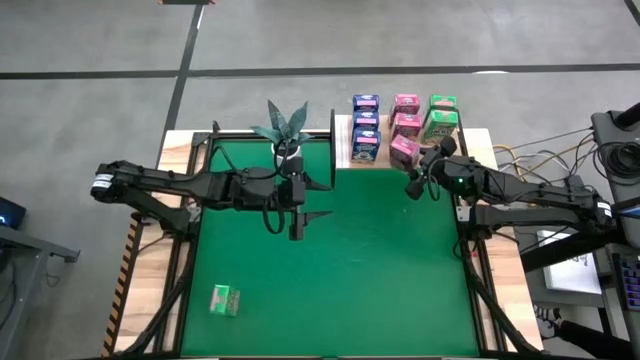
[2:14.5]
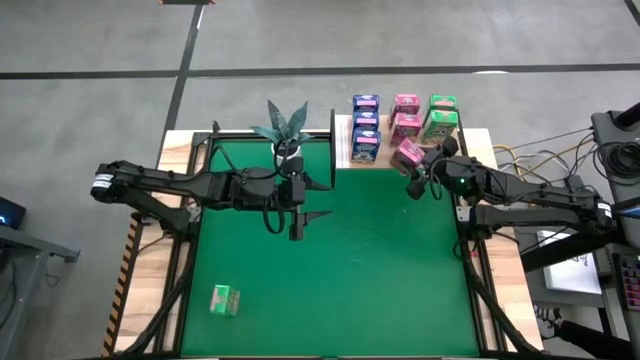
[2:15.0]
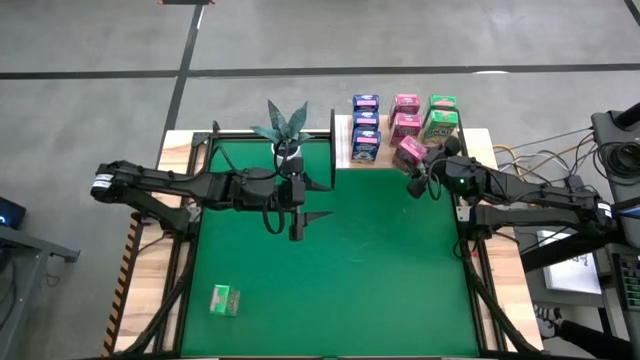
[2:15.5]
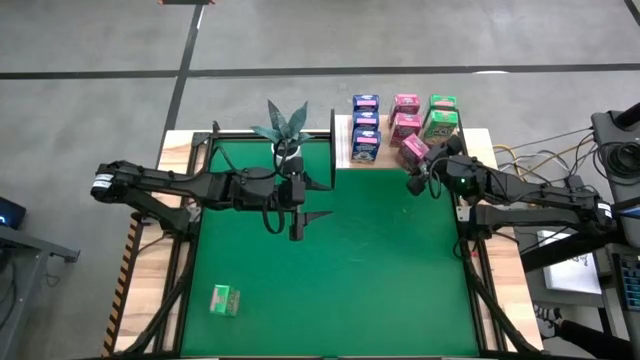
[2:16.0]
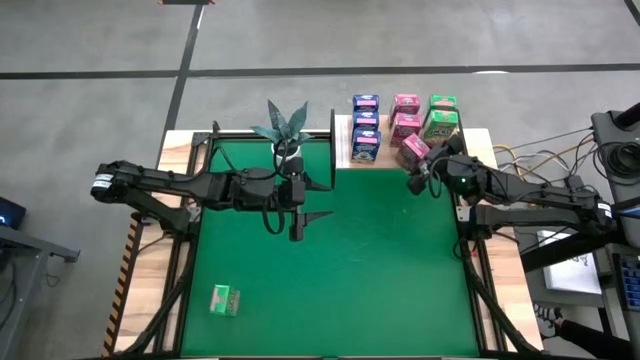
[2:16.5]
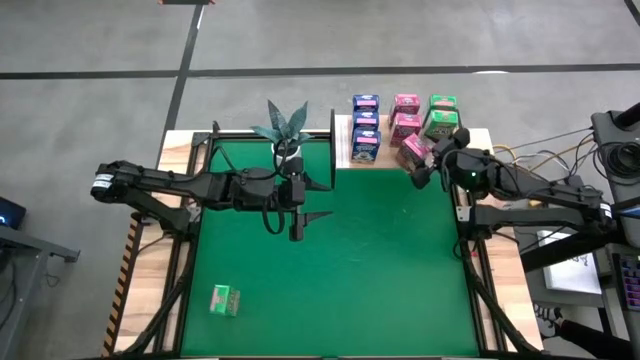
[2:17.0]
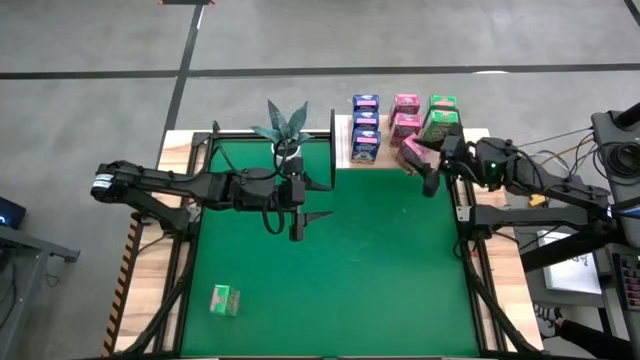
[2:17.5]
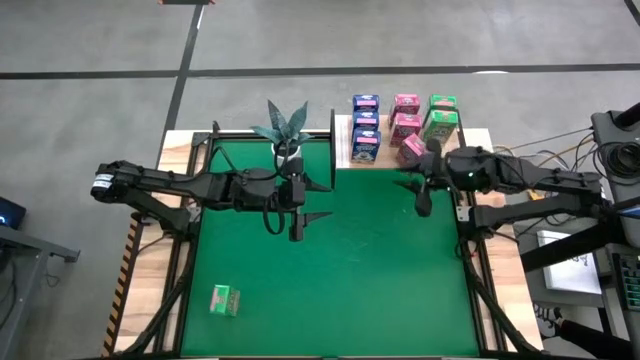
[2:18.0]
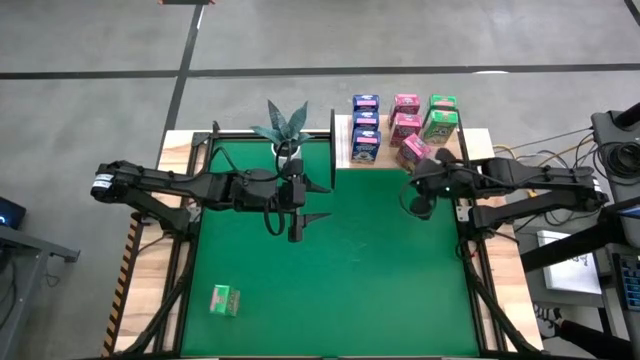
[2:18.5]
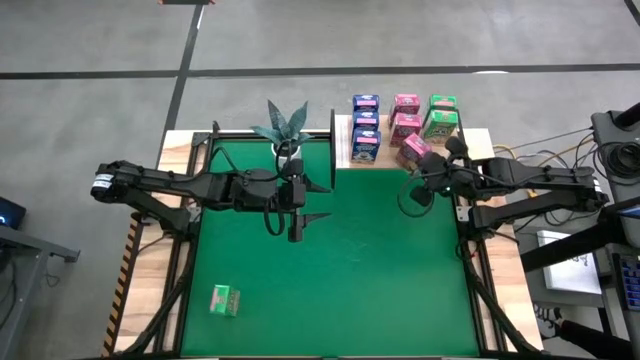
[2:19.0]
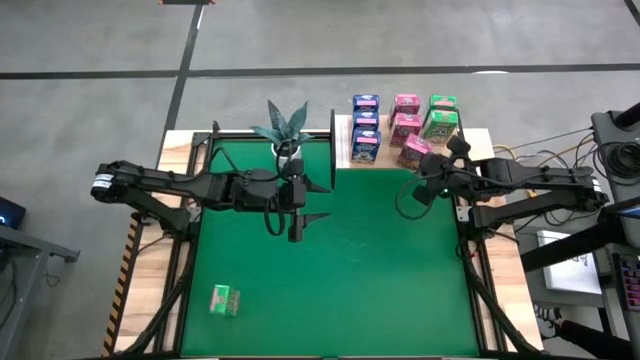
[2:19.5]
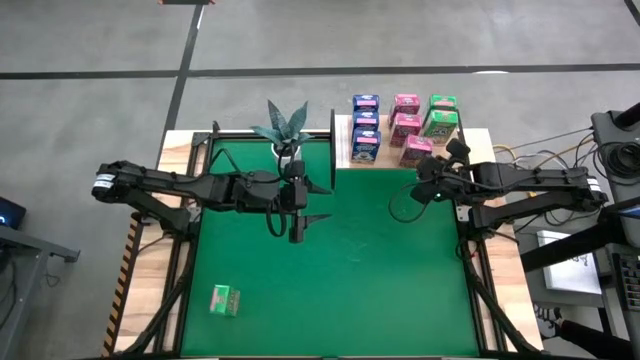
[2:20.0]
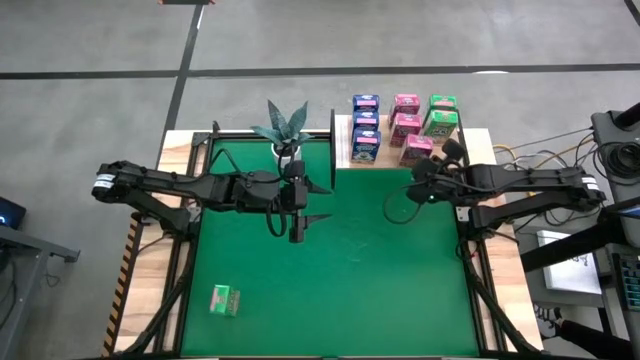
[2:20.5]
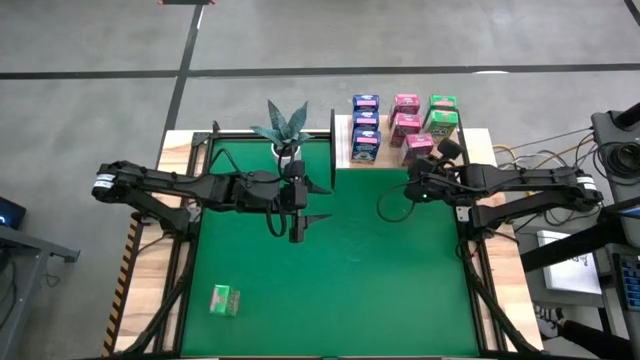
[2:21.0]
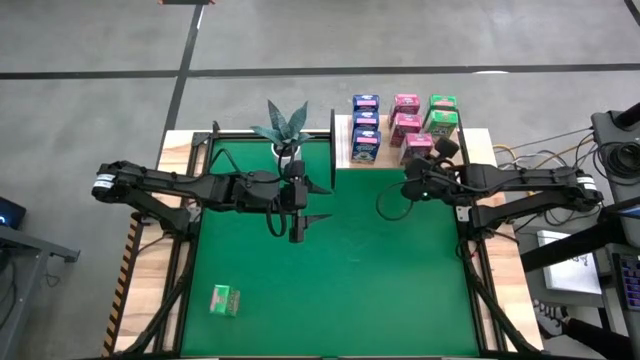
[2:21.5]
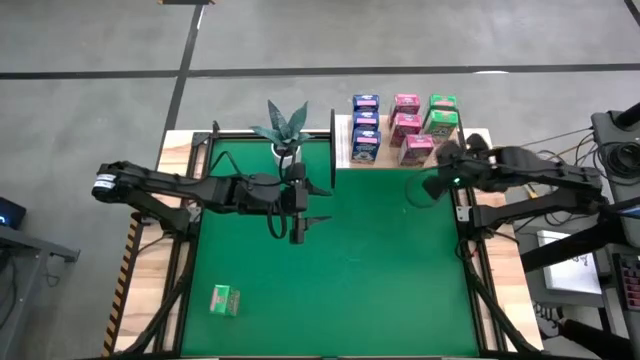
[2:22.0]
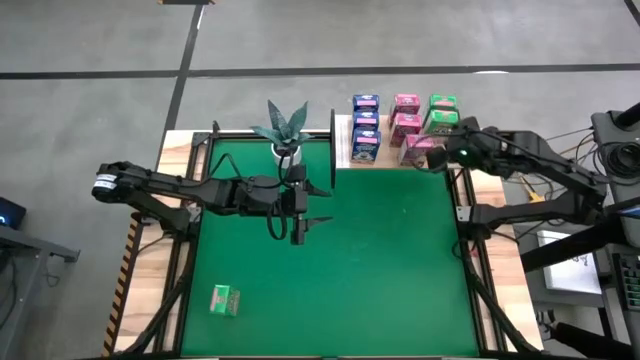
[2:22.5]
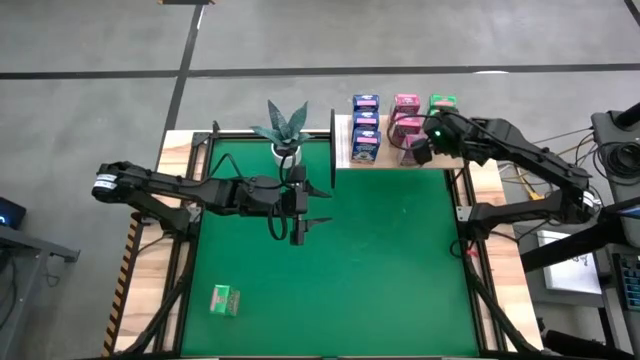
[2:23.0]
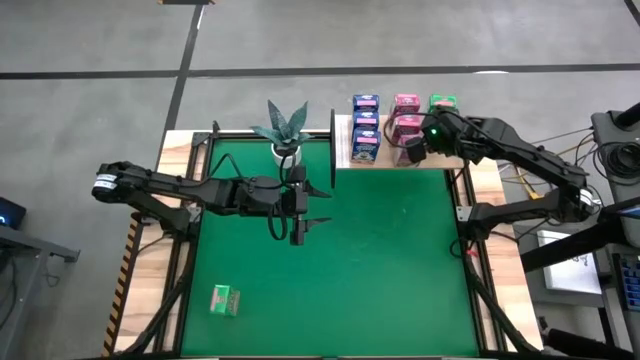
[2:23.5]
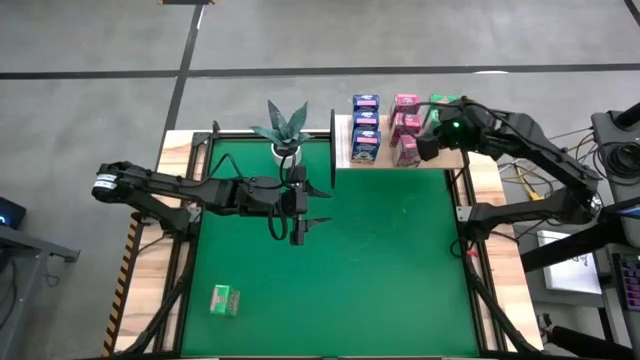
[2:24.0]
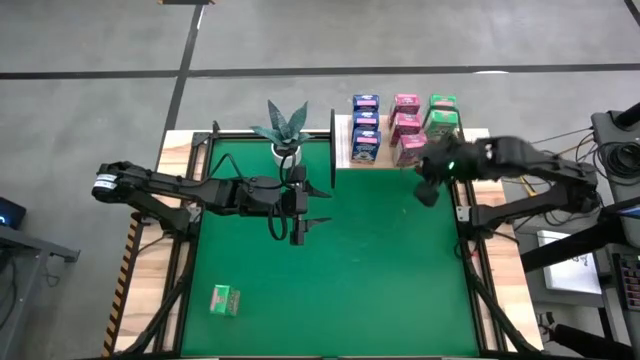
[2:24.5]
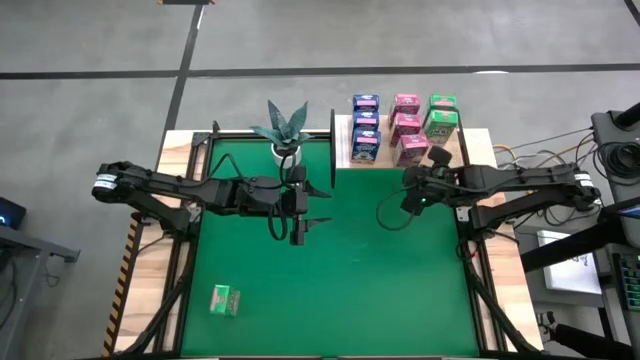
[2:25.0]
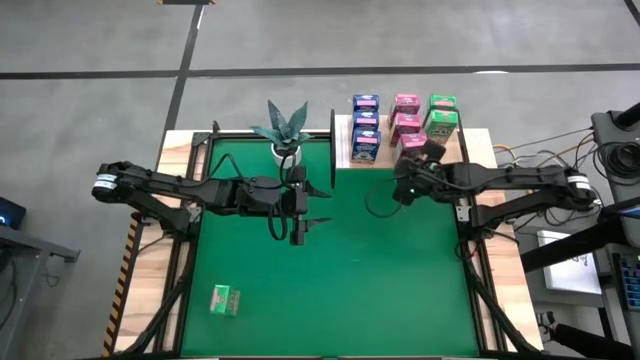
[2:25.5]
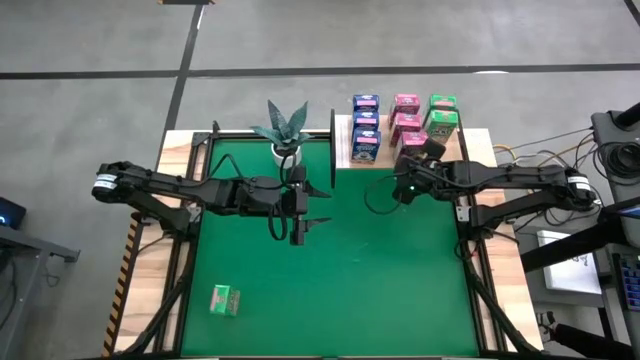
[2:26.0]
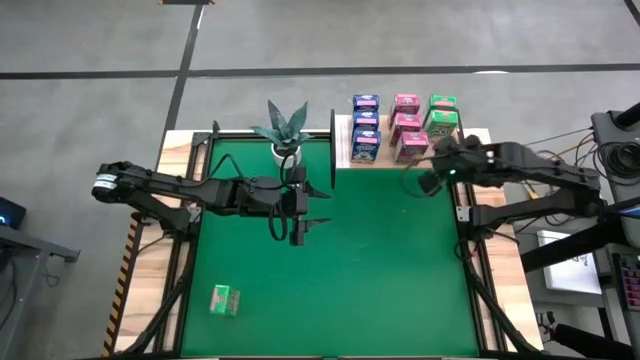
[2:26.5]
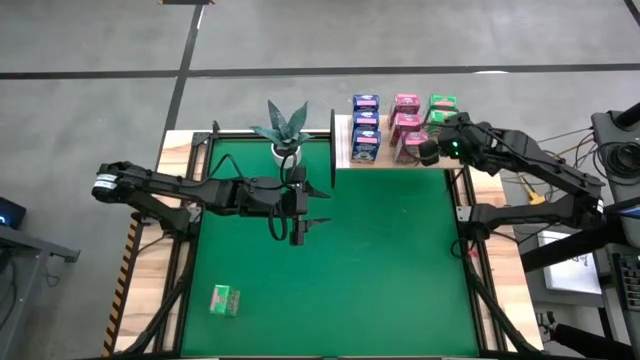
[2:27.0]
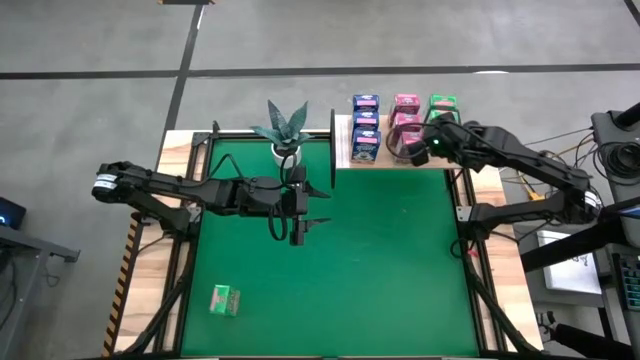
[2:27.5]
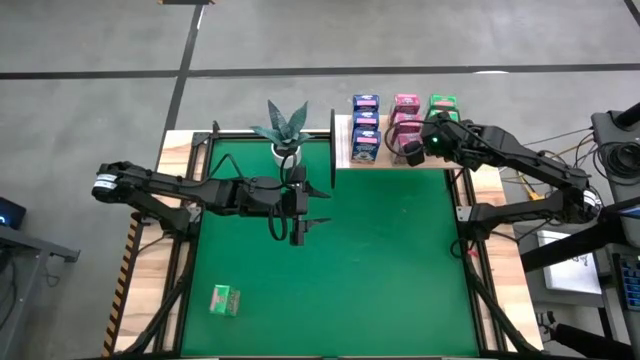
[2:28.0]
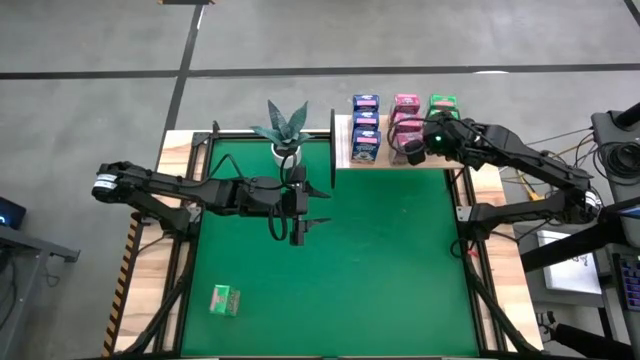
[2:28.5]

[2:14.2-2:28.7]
Task: Stack cereal on shelf
Put the pink cereal box on the shelf aligned with the other pink cereal boxes

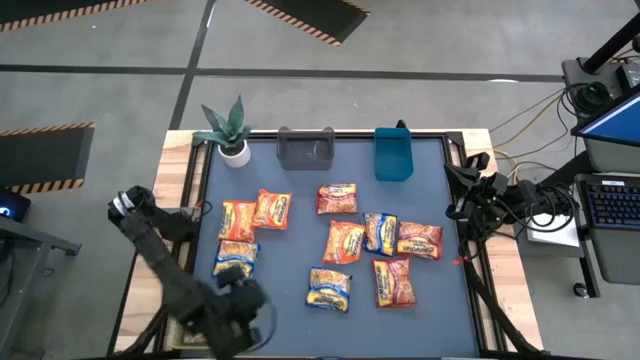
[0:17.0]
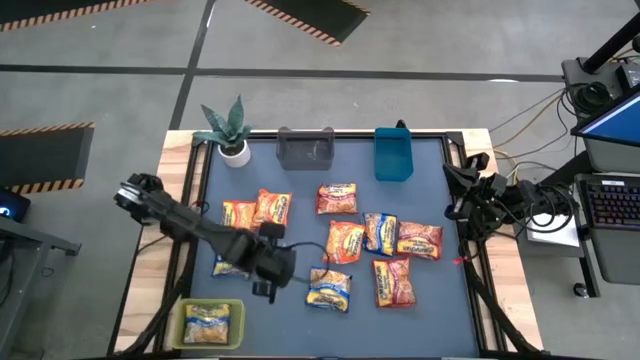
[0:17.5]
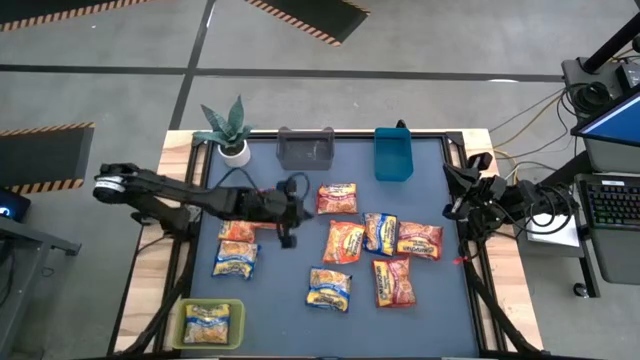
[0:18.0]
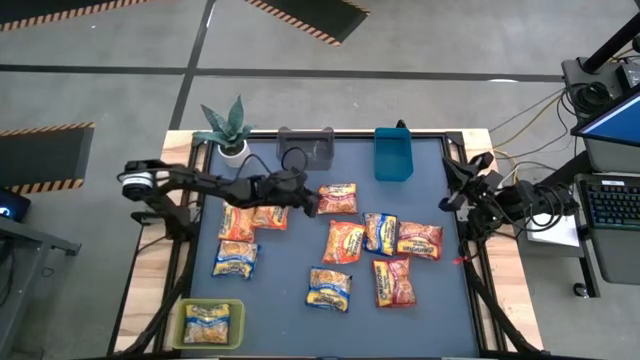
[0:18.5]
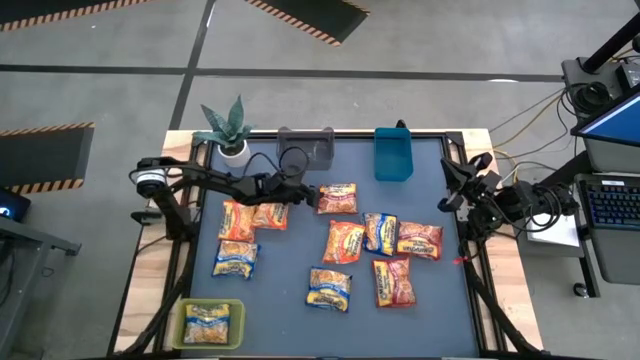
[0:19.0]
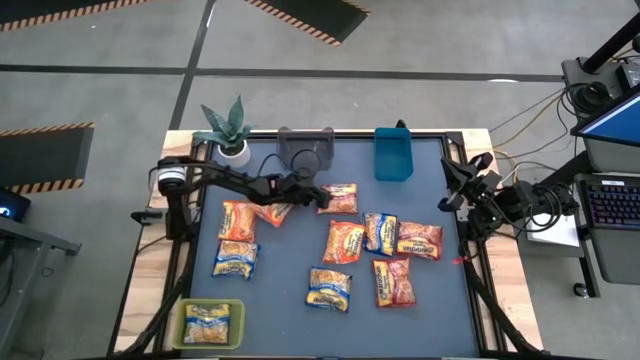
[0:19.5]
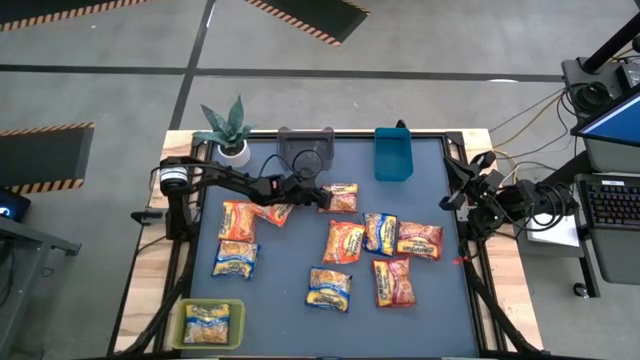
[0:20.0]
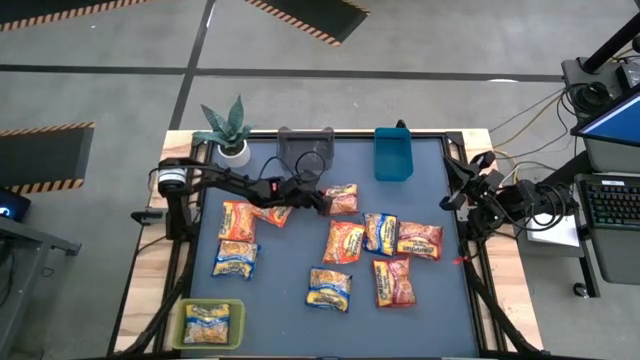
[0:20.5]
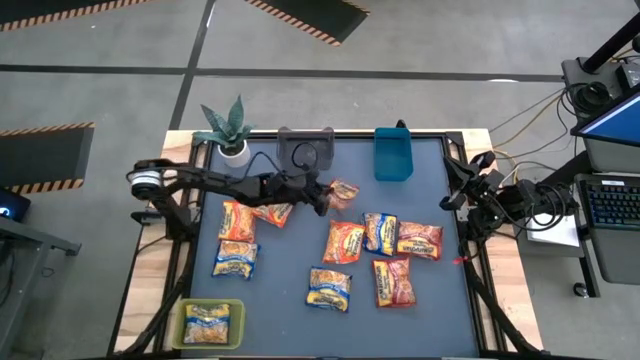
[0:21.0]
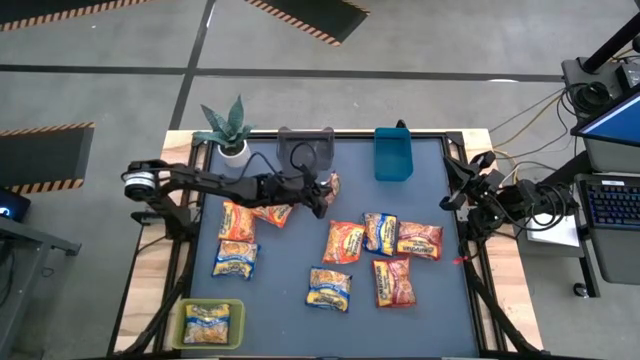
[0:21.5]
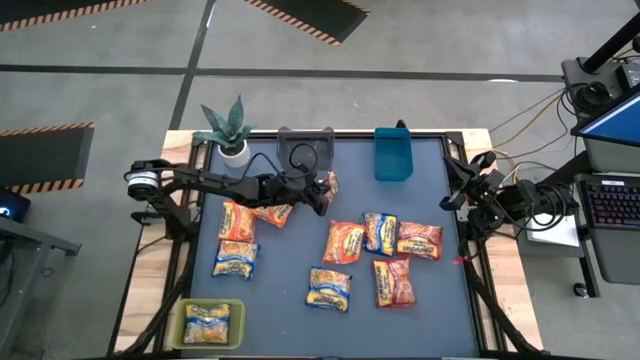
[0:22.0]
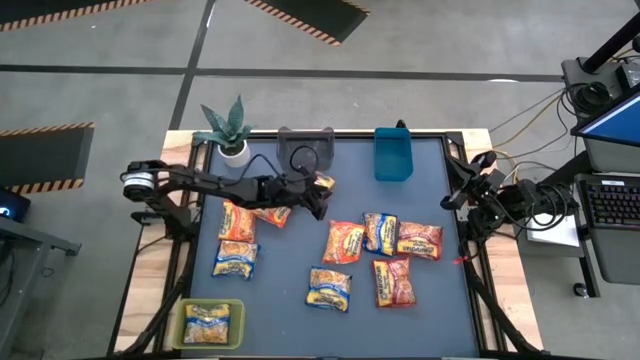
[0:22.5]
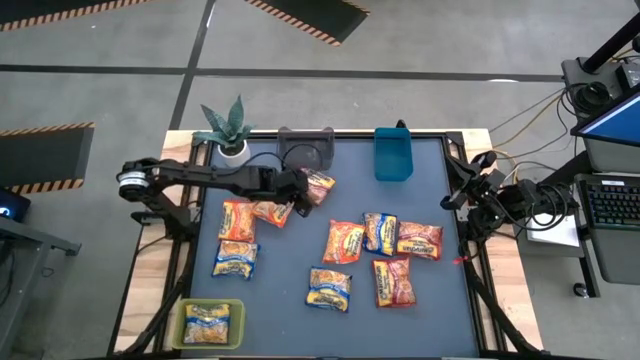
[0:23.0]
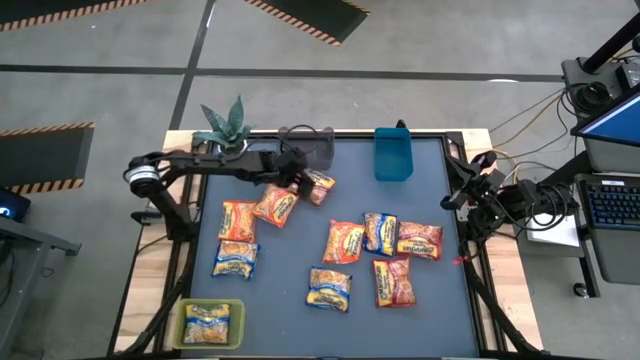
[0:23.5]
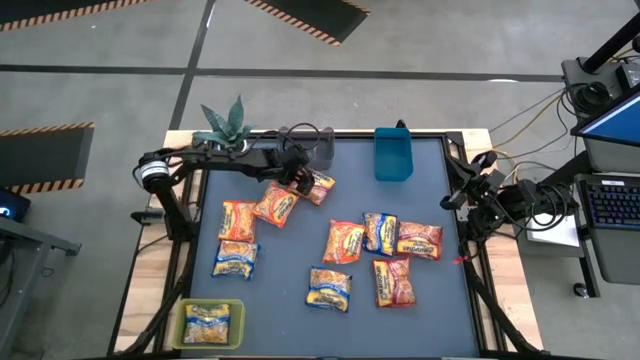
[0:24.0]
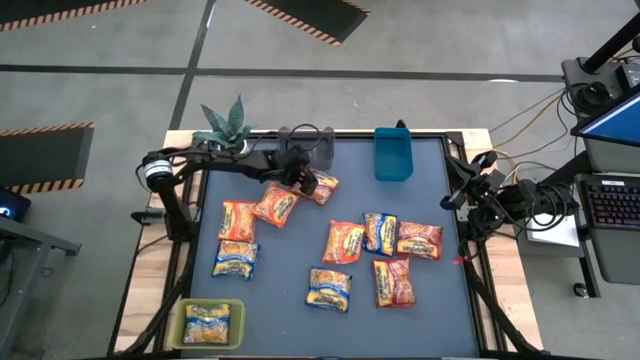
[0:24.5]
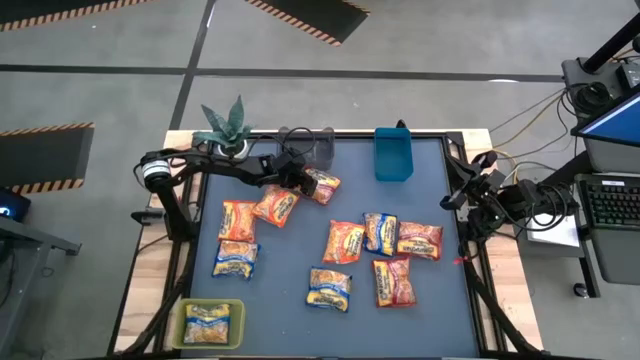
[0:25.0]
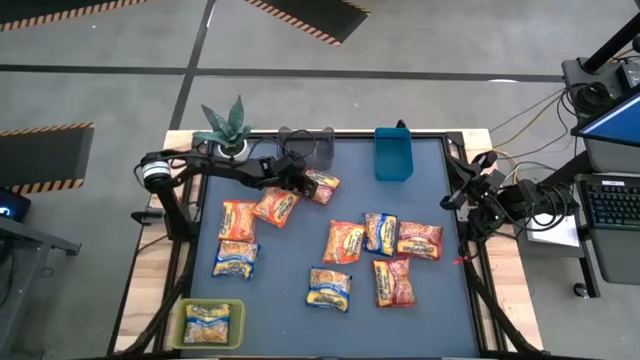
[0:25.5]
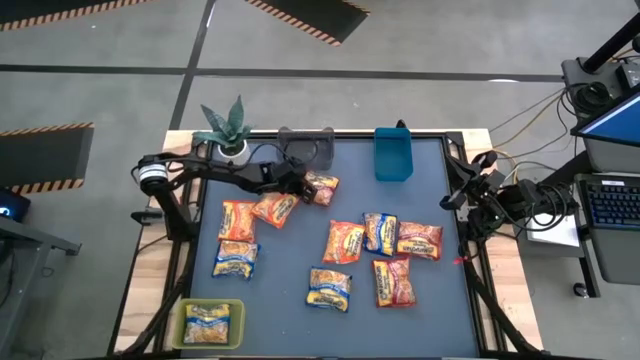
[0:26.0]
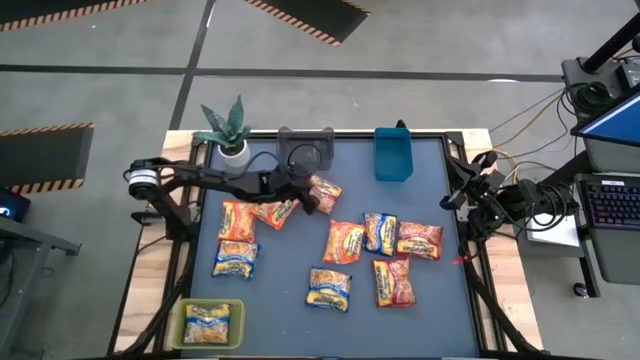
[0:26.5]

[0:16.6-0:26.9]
Task: Sort Maruchan noodles
Put the top left red noodle pack into the black bin
